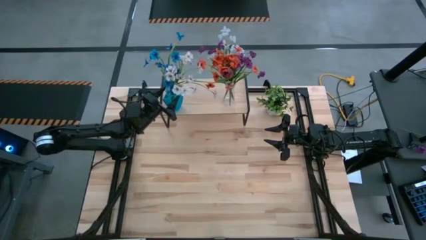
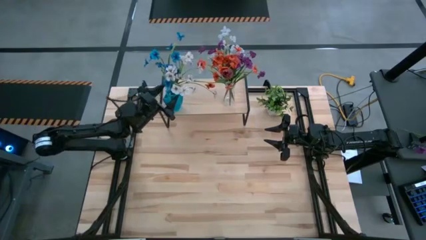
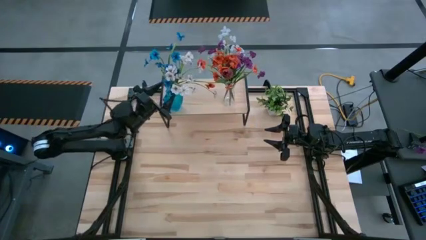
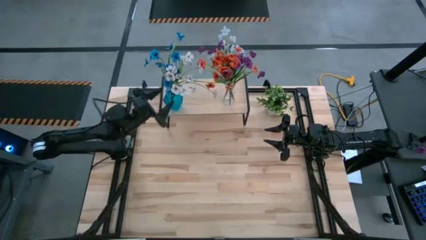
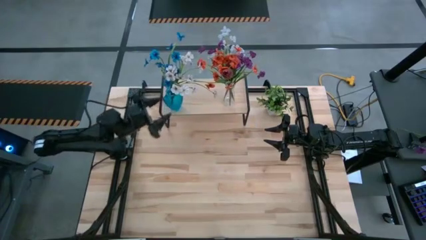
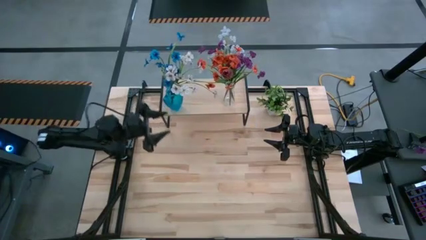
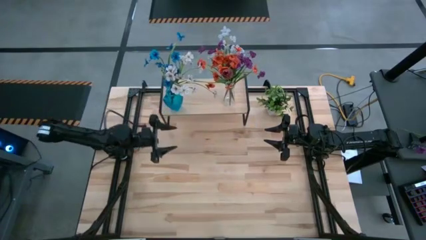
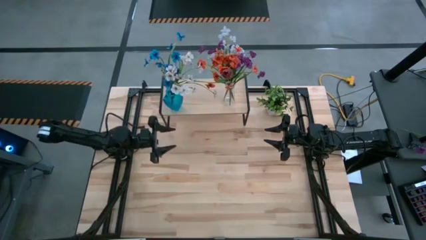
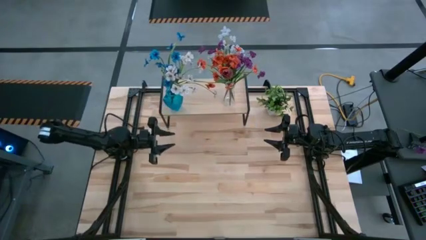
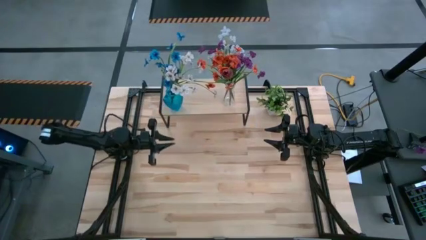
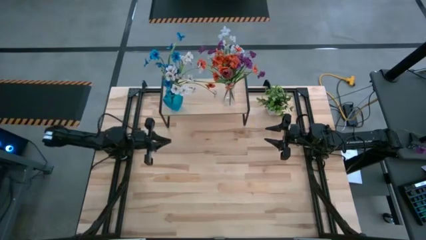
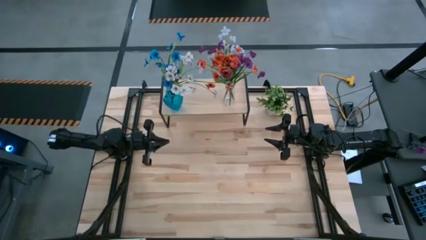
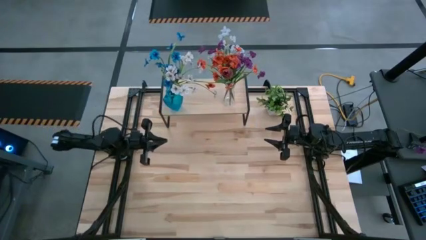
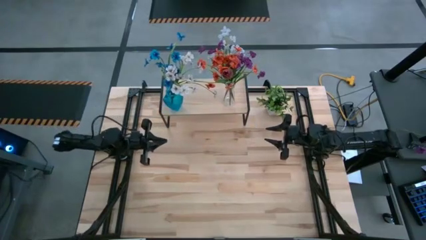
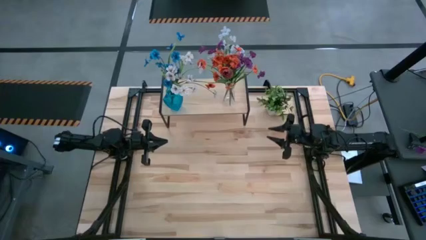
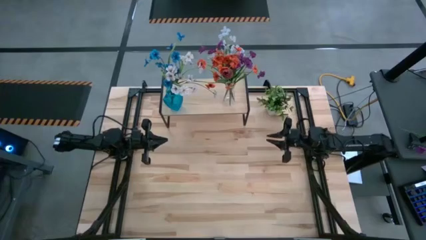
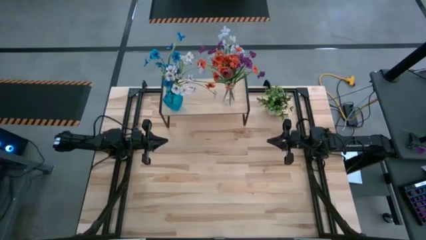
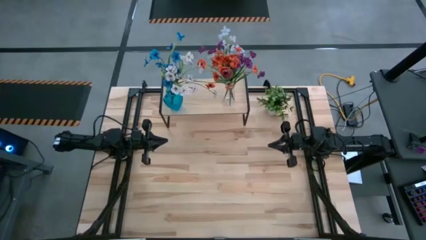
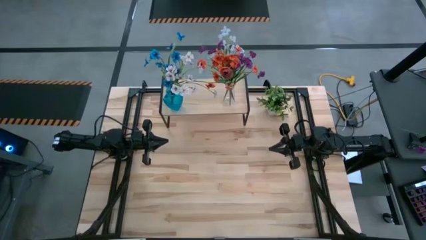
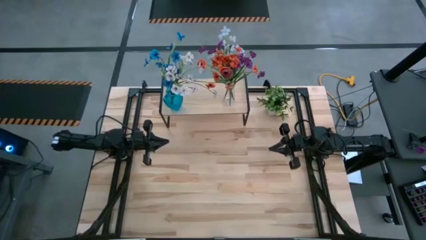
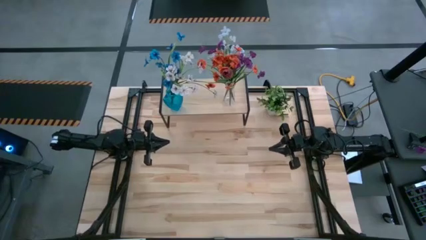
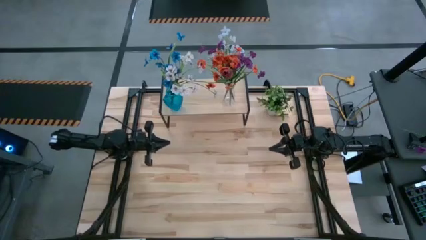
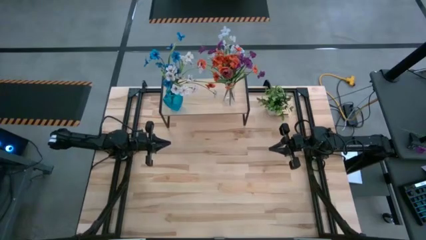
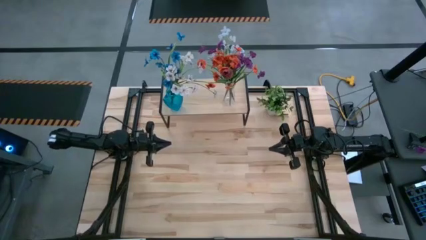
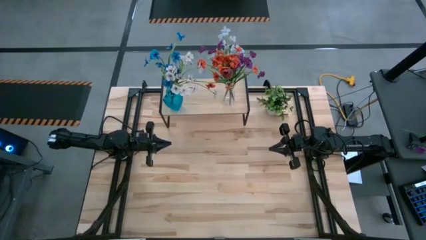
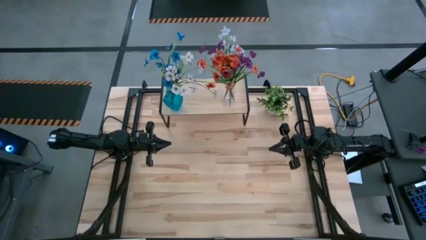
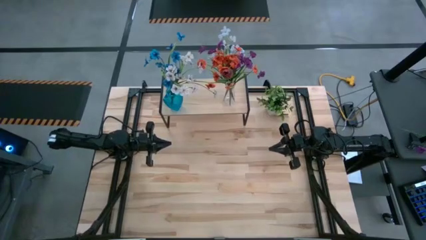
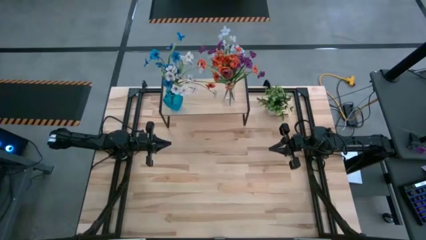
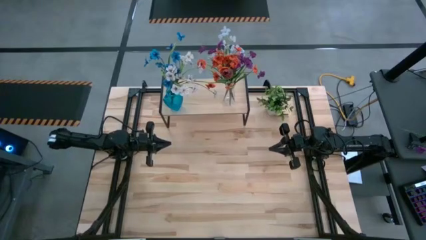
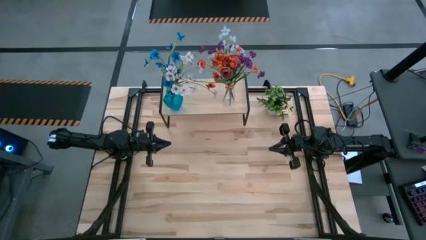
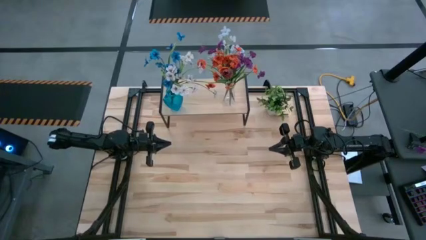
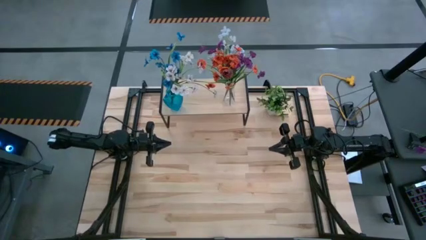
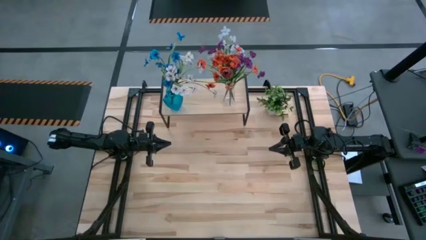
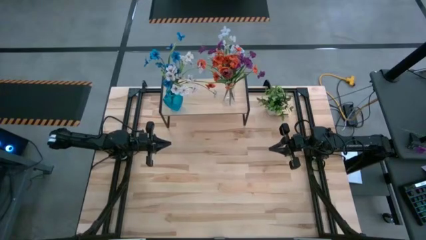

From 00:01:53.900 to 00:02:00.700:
Task: Pick and place flowers into a vace then onto a shelf
Return to Home Position

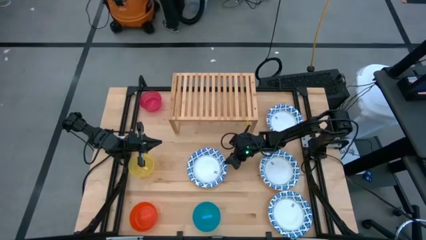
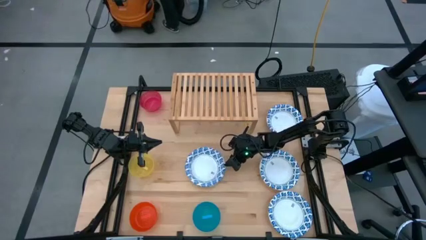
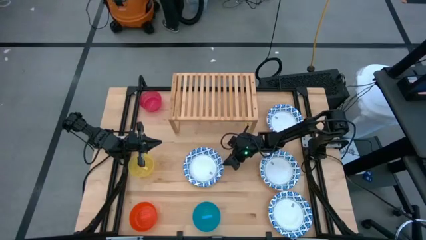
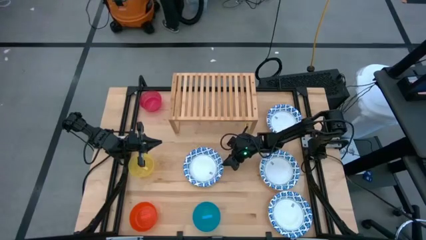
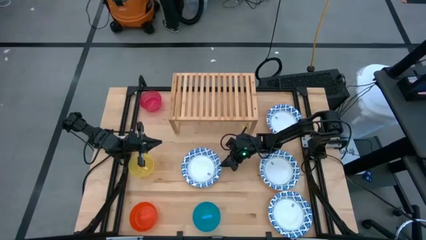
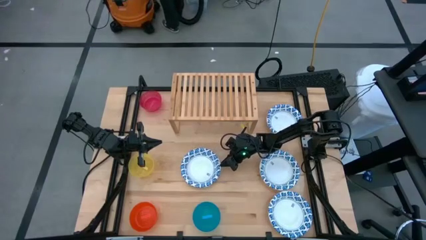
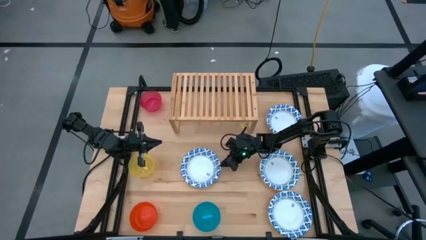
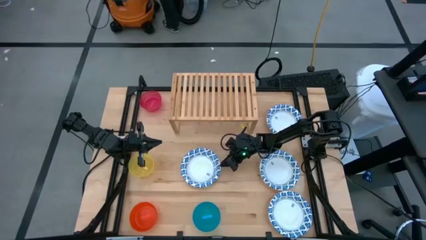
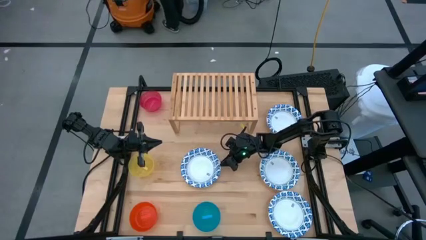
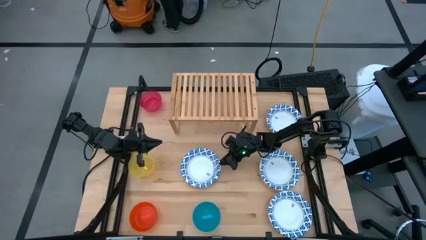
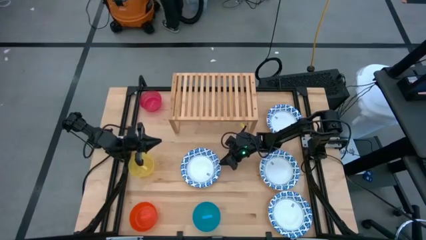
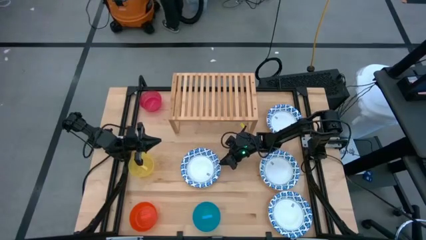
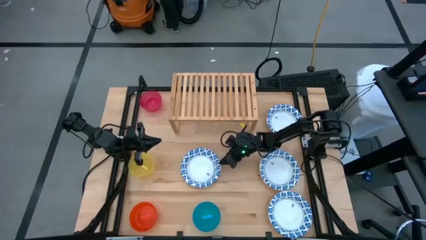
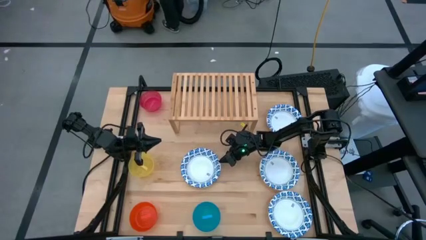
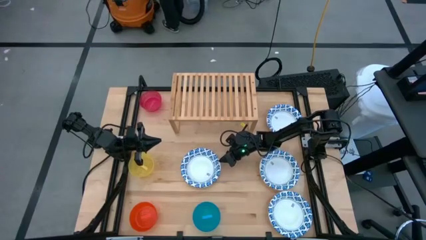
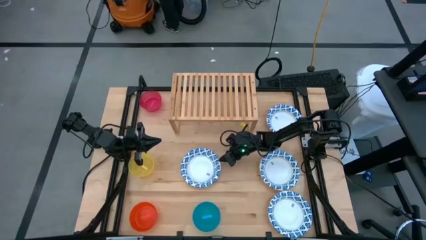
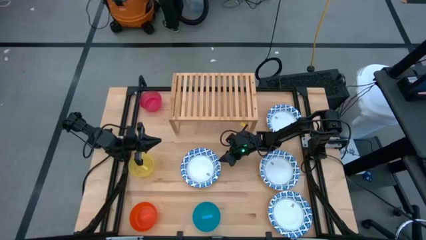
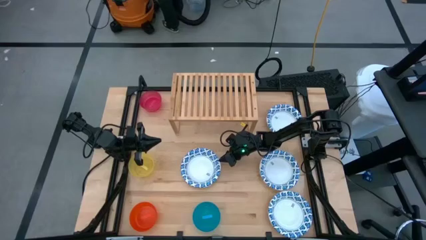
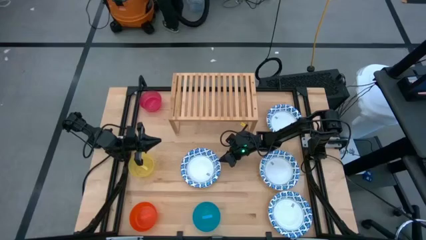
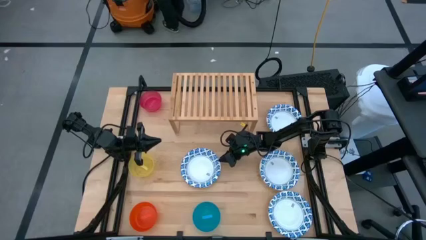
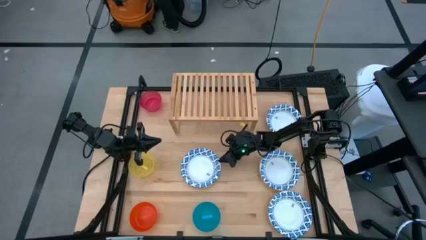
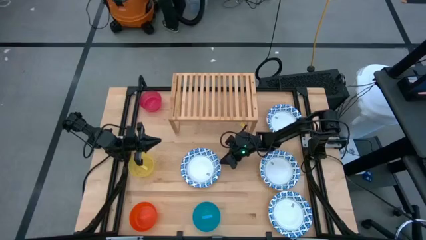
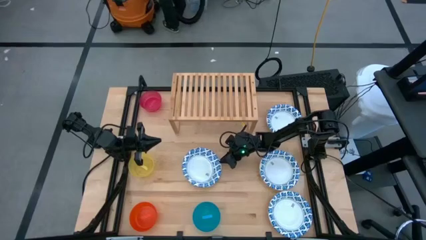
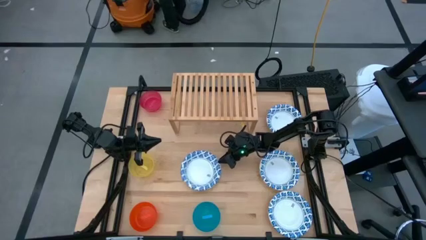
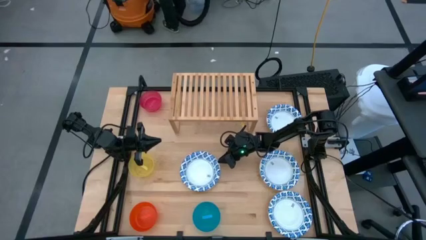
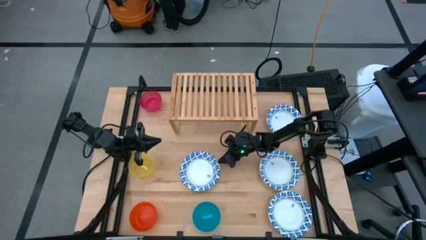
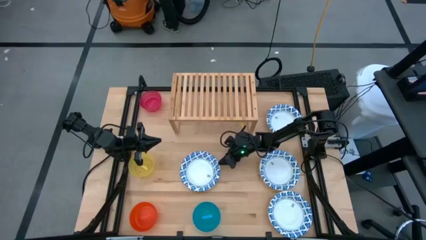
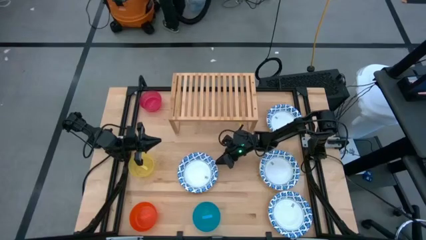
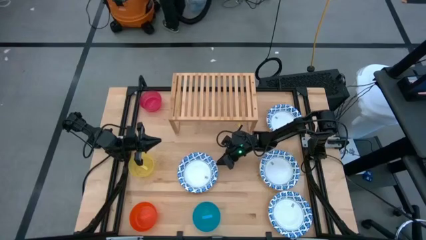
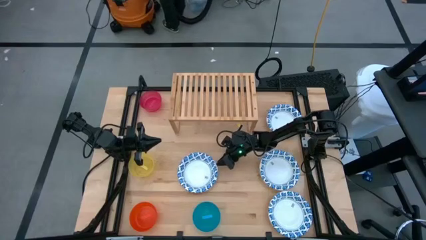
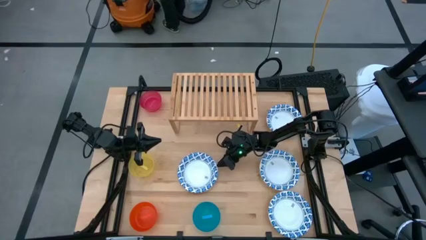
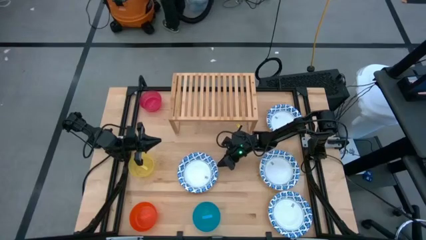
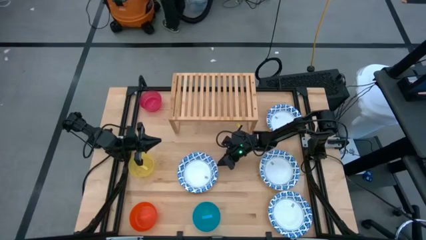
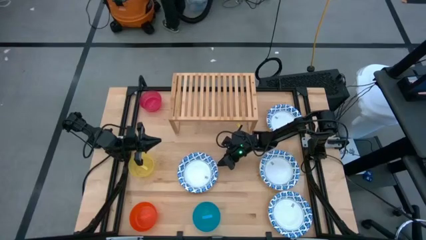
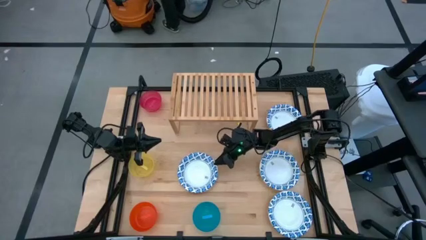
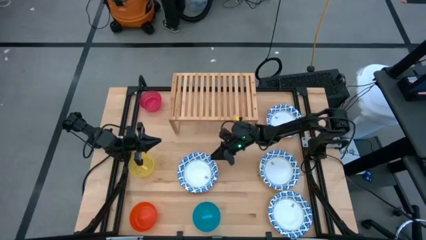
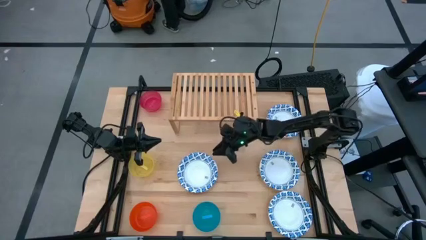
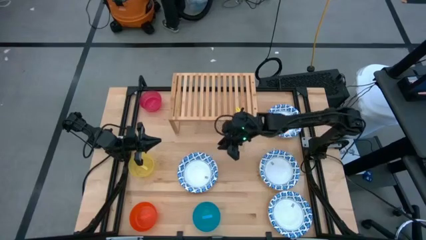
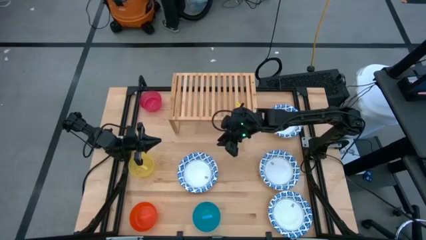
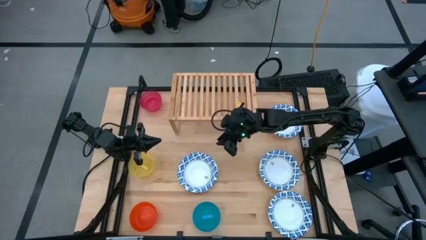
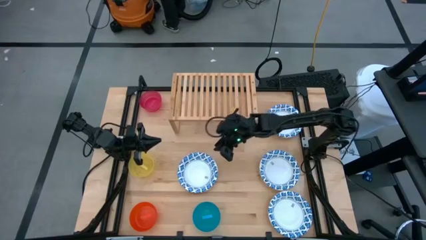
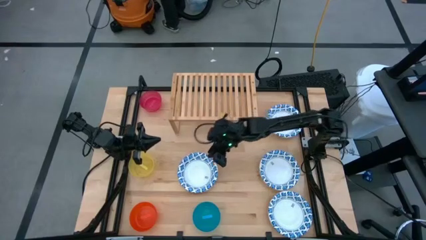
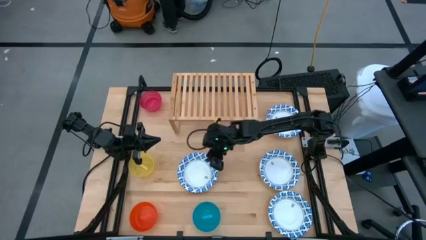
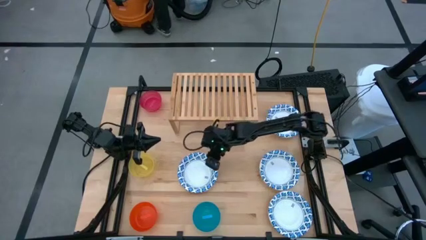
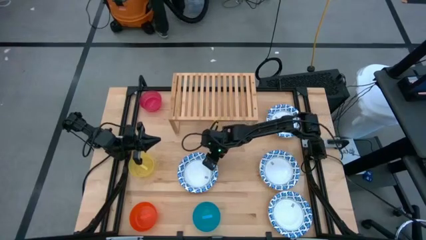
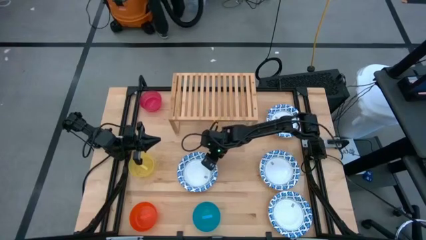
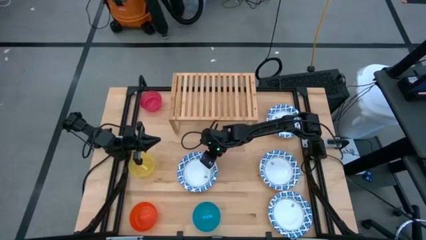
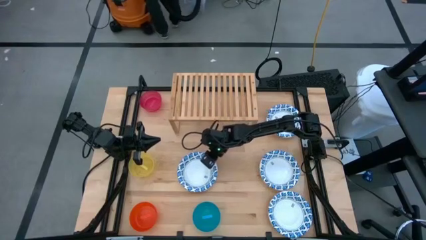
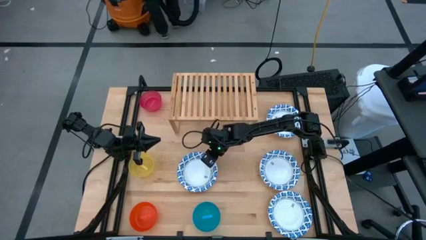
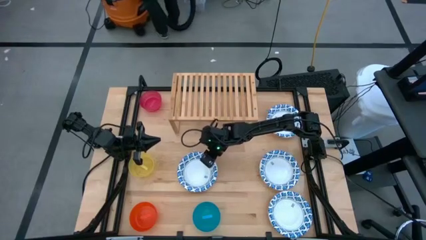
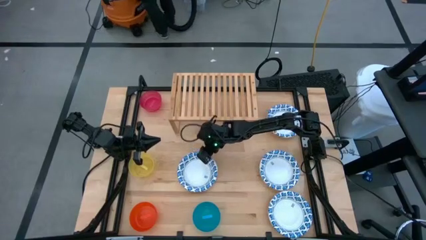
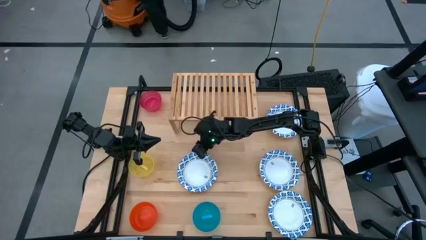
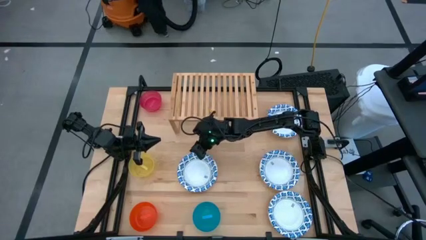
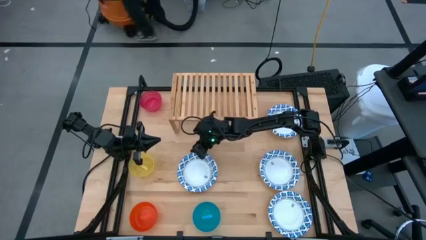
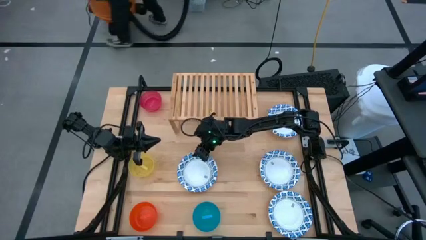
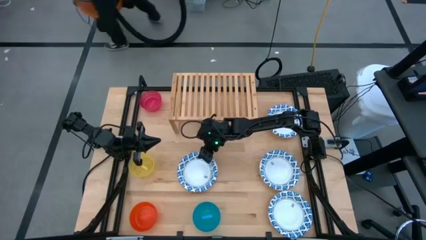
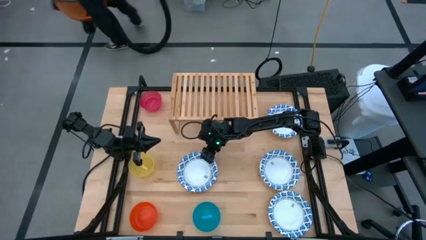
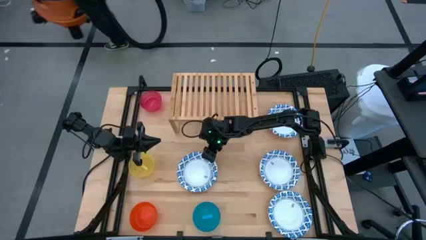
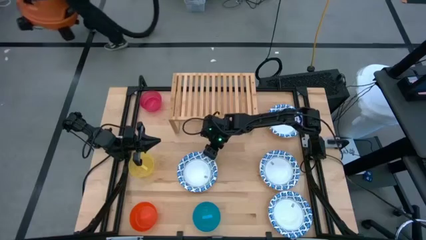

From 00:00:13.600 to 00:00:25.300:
Task: Place and stack bowls onto a shelf
Put the white bowl on the shelf
